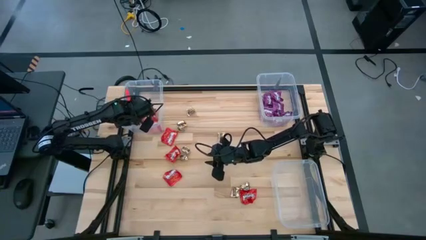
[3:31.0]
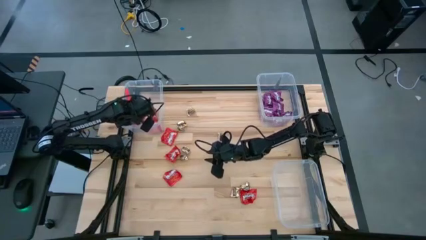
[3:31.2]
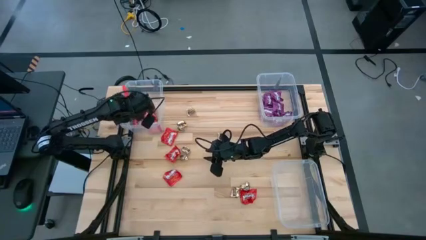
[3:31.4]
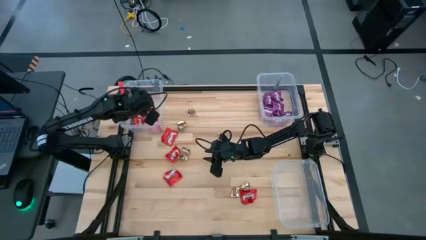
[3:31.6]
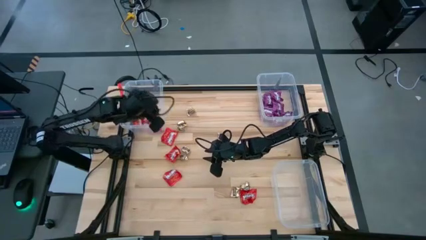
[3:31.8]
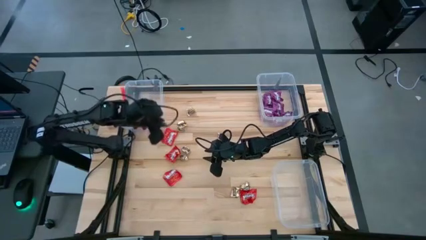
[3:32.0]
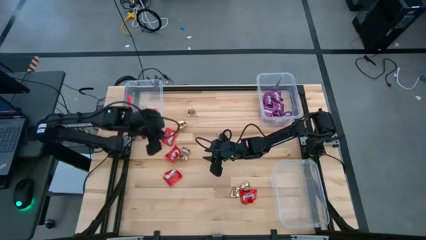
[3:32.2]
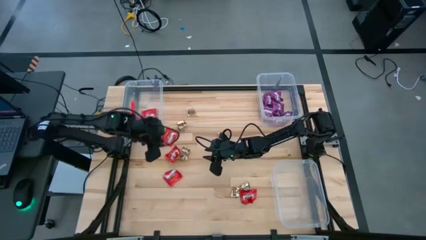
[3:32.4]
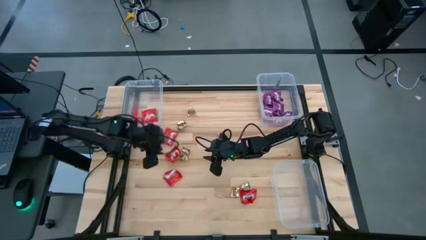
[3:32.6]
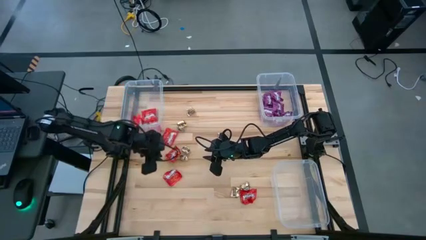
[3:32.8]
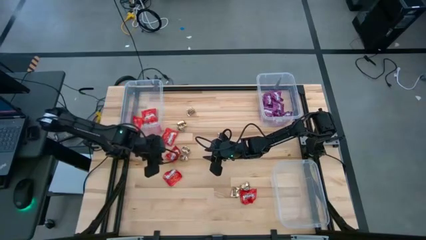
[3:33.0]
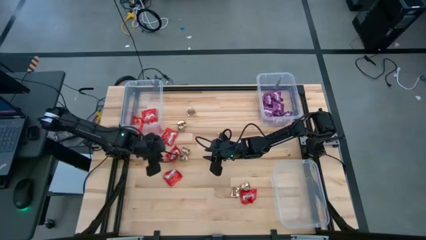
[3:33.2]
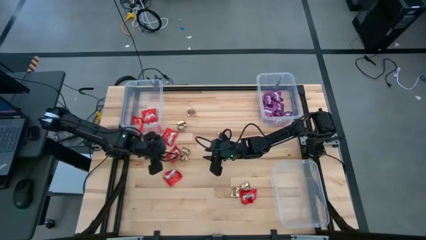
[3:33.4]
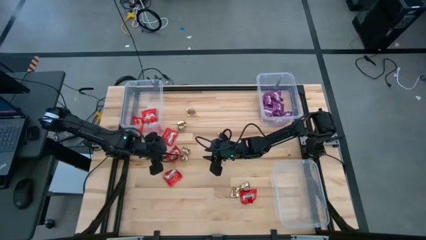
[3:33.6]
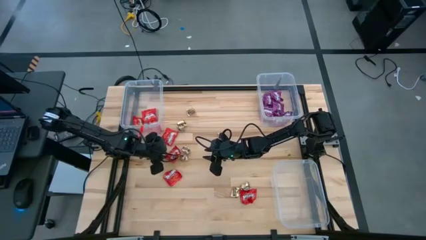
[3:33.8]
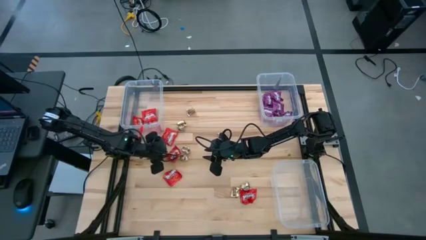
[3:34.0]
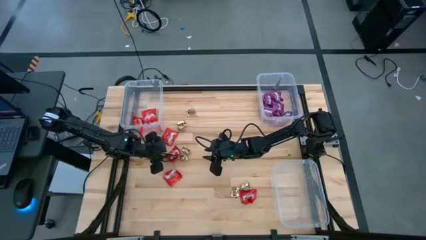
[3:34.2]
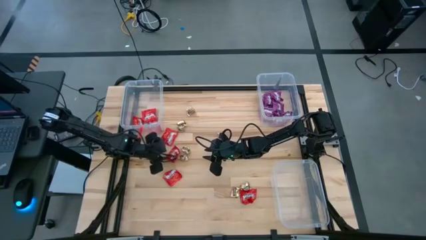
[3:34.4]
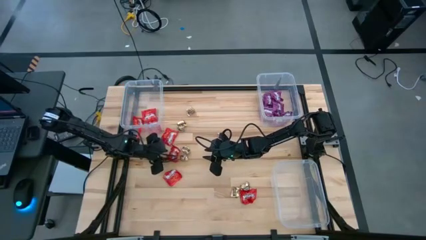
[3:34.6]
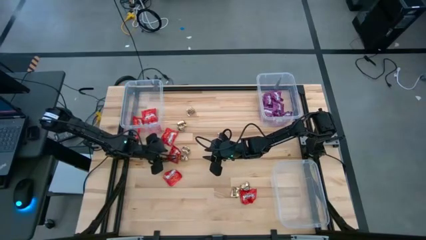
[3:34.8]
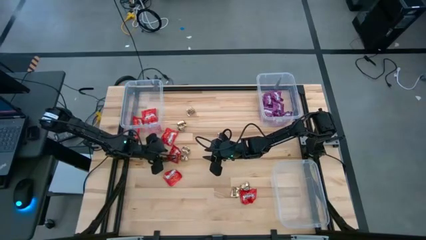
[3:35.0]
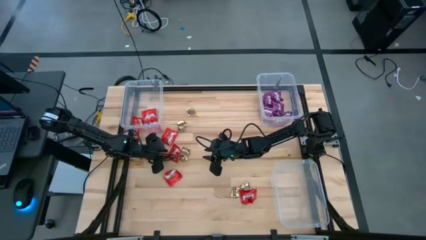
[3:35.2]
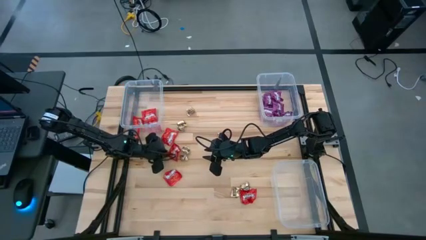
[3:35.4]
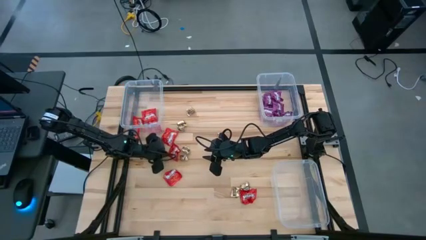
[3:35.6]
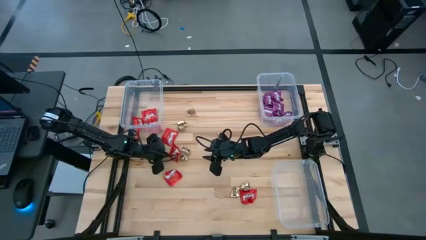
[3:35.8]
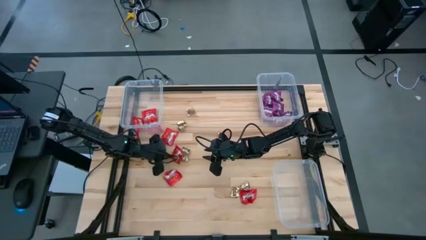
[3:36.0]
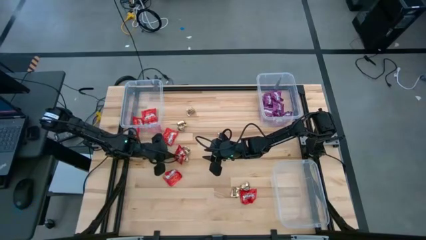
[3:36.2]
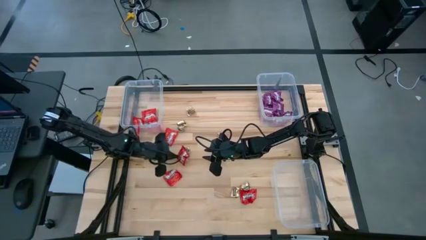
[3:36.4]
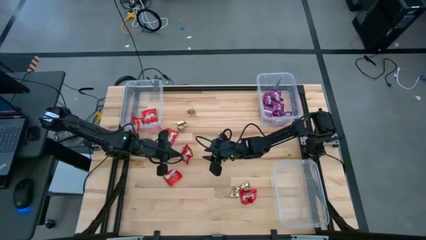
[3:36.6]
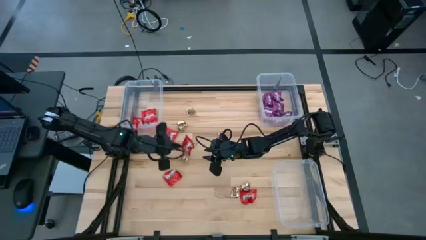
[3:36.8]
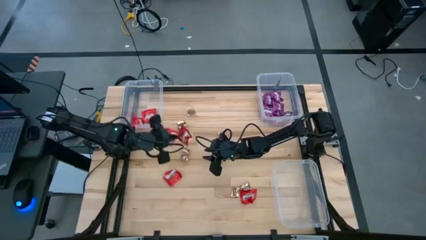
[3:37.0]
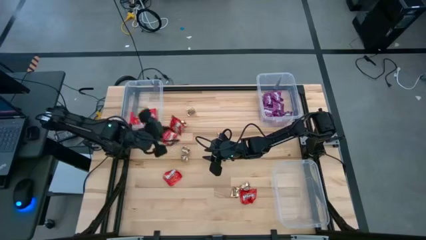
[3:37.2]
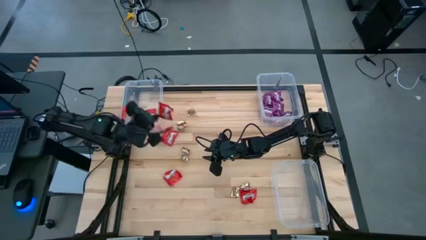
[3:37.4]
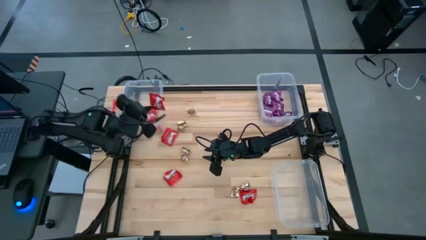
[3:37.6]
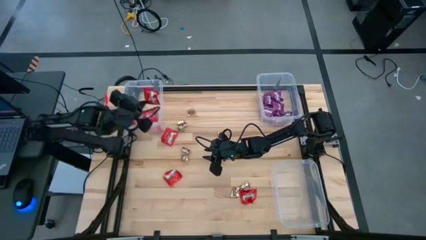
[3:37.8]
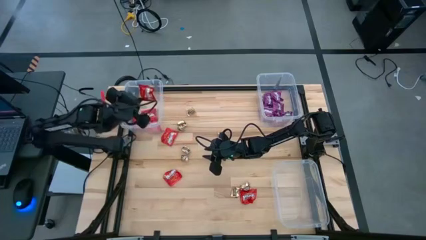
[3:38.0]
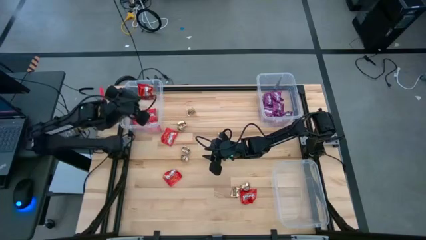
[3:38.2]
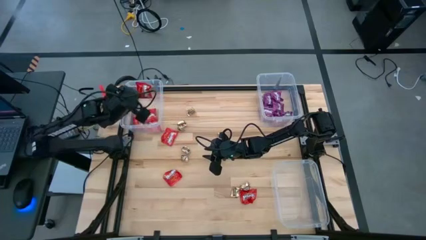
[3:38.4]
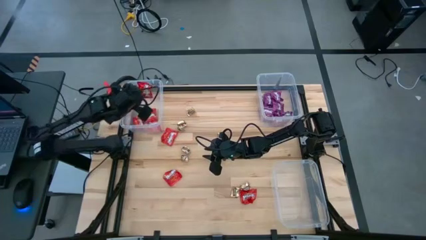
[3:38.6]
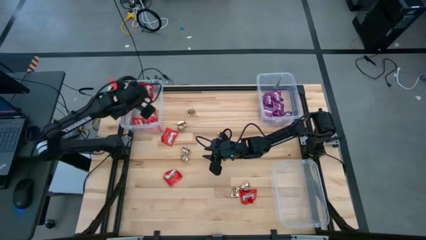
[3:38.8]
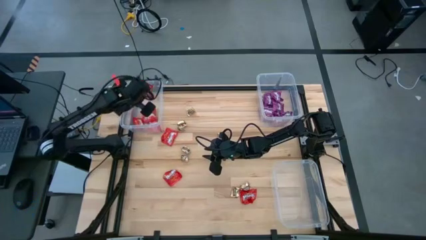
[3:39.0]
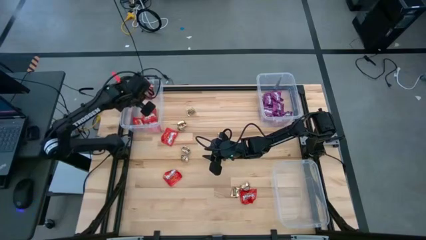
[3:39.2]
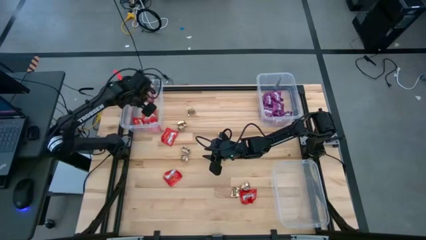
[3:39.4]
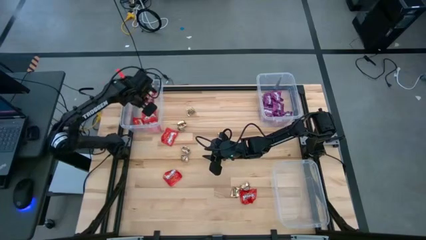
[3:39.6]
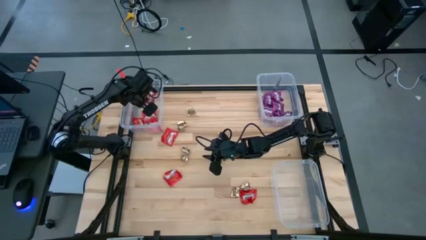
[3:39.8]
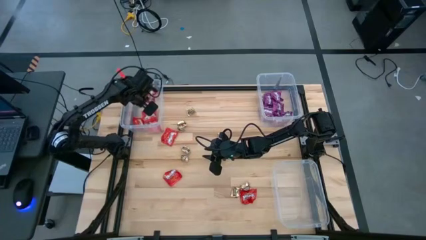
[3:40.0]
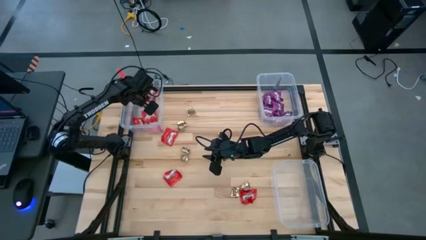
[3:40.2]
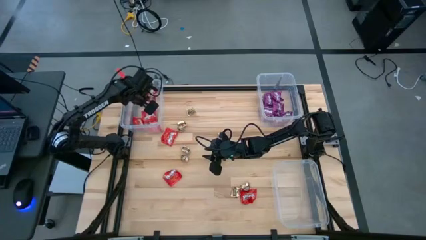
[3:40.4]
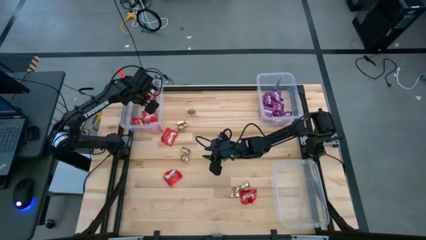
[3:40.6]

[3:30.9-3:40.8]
Task: Sort candy
Put the red candy into the top left transparent bin

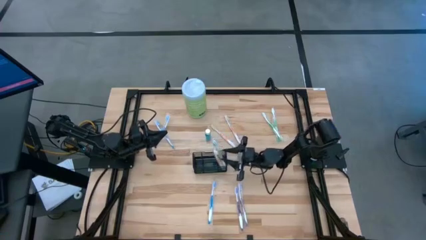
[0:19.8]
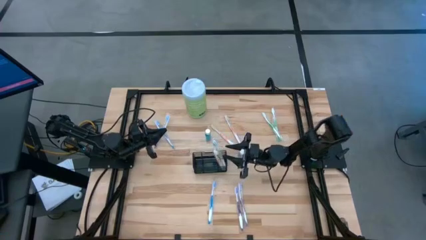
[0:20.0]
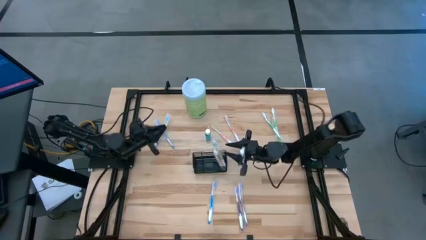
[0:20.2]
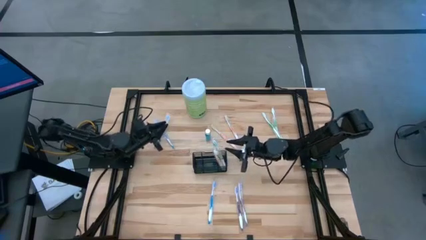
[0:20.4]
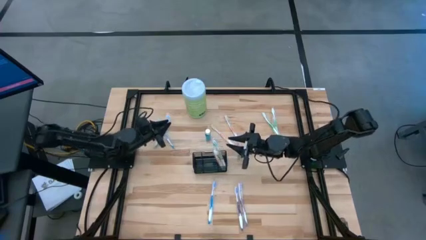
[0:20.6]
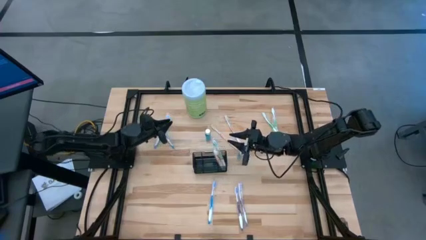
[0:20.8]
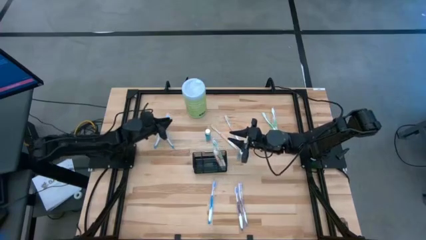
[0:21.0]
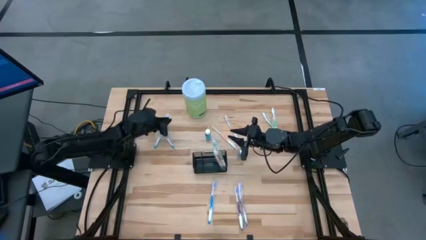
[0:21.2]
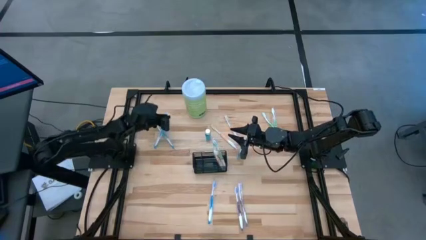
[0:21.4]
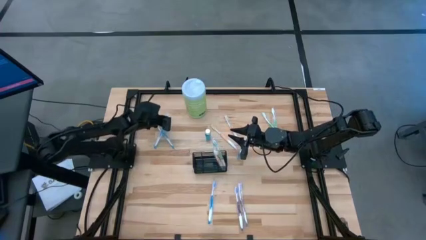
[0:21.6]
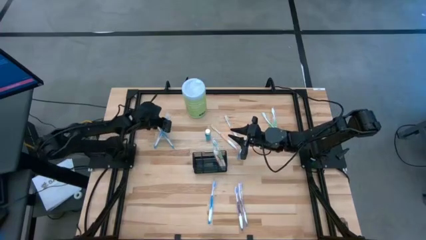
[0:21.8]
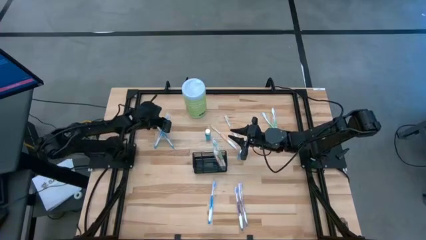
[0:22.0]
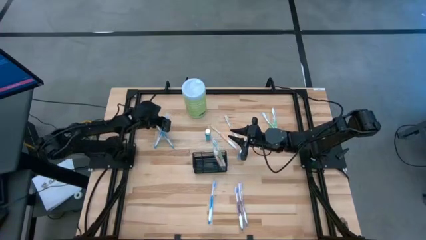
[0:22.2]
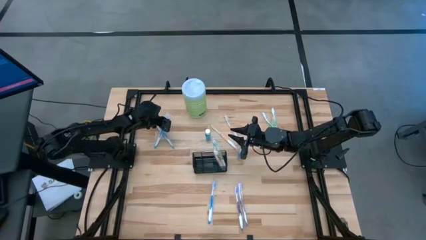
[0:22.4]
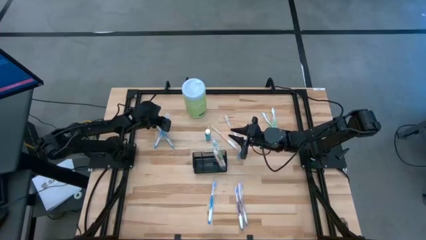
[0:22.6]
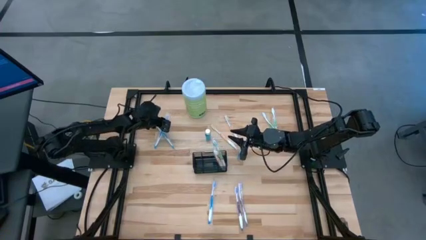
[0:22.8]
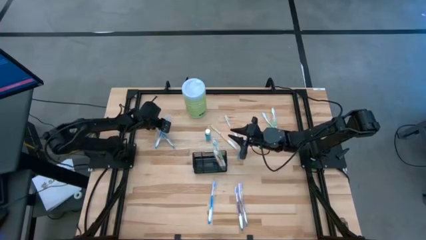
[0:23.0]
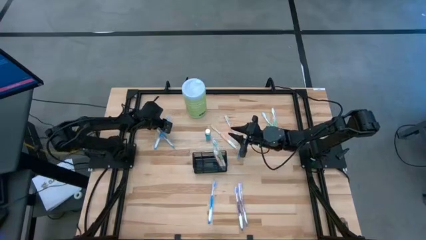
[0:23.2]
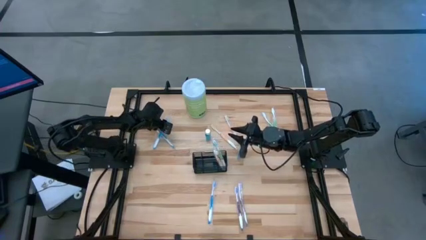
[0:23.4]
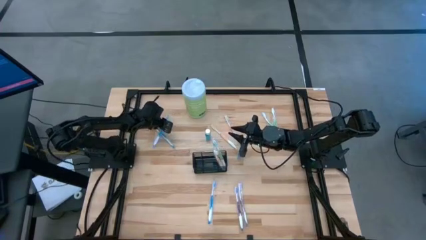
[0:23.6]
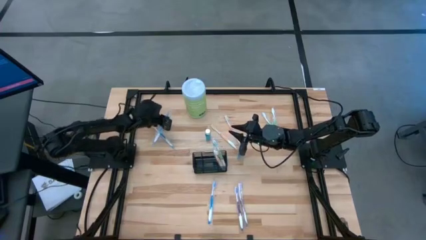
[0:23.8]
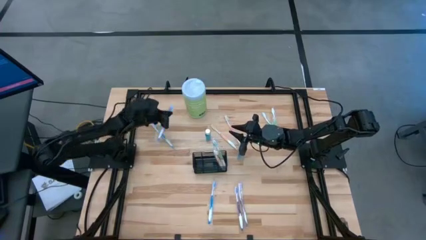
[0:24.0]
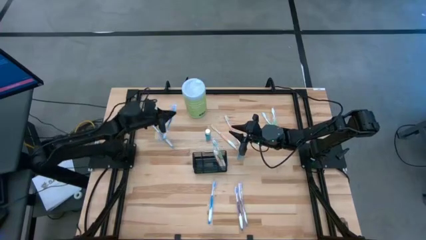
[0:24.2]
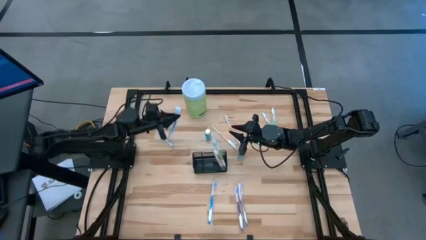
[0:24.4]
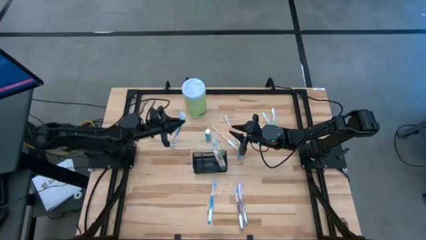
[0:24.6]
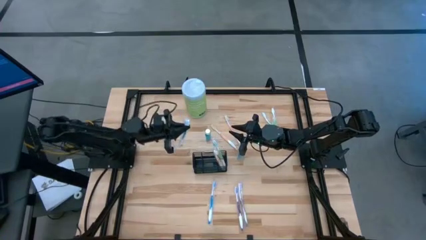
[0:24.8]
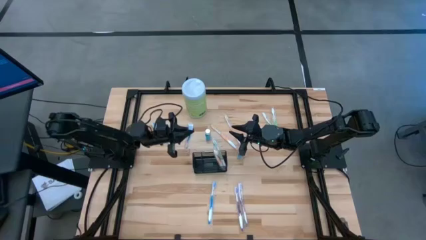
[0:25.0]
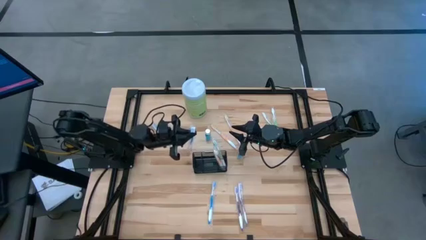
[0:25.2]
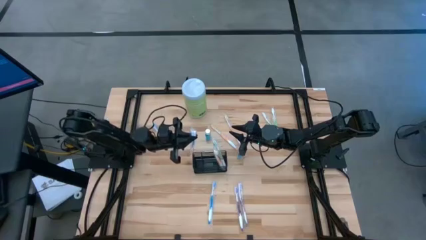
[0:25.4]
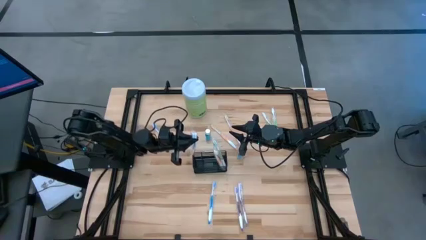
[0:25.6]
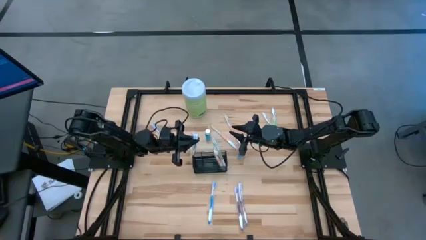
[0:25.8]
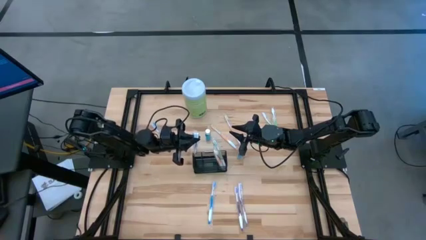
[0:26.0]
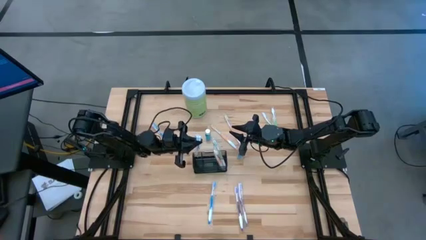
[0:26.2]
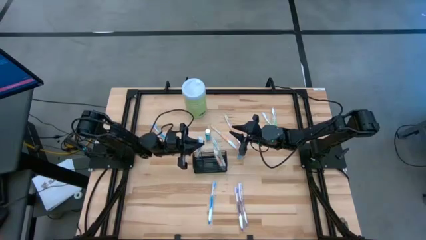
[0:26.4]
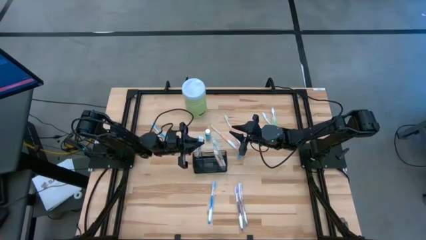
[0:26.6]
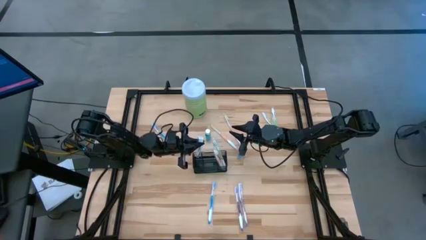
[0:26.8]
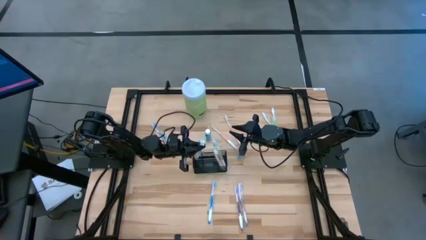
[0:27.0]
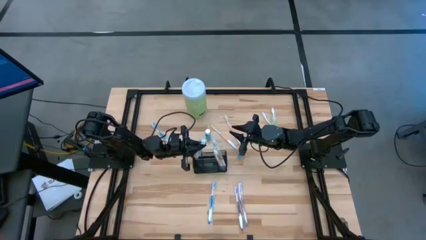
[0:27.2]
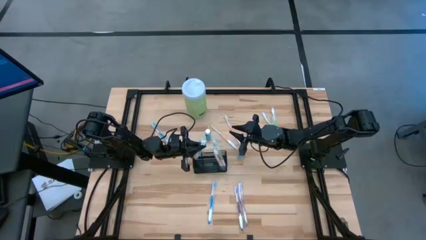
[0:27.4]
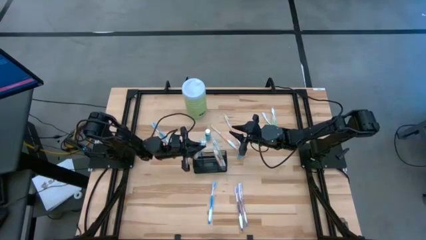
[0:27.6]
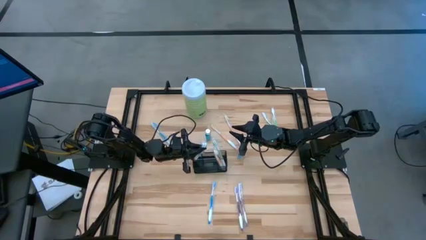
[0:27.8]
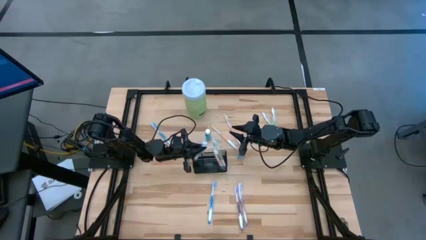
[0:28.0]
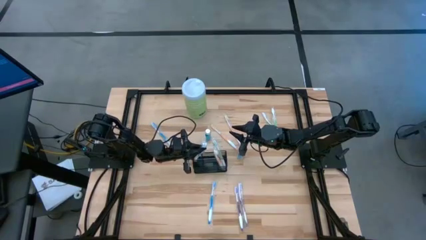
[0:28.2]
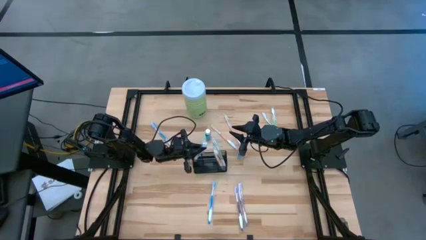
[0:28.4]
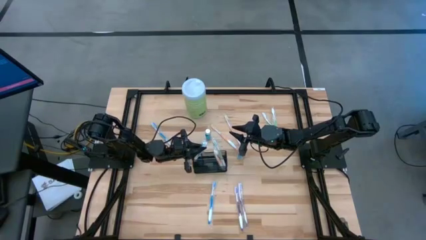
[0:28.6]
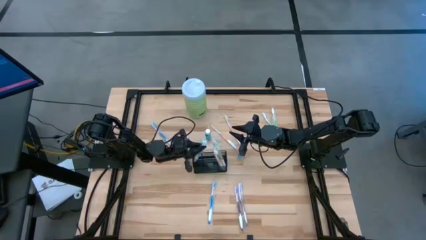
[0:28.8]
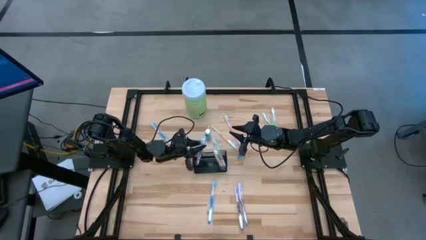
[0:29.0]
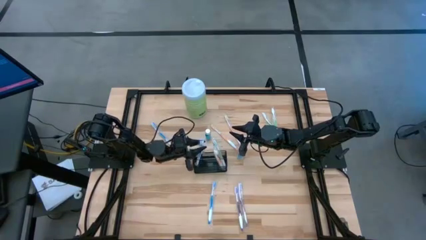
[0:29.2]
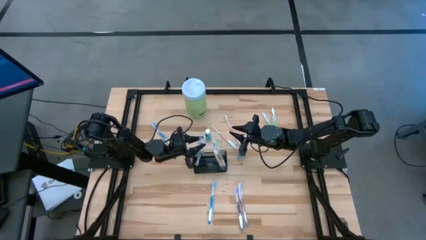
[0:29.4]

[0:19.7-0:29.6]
Task: Pick & Place toothbrushing station
Put the right blue toothbrush into the wire organizer
